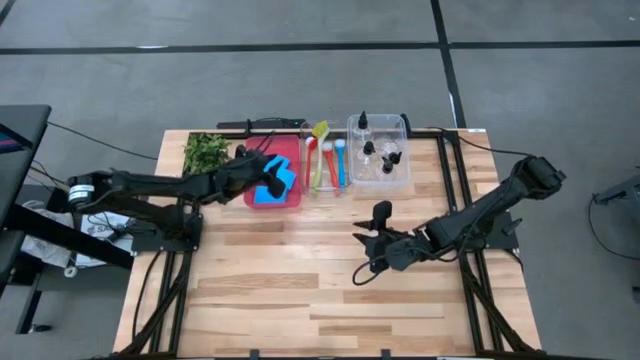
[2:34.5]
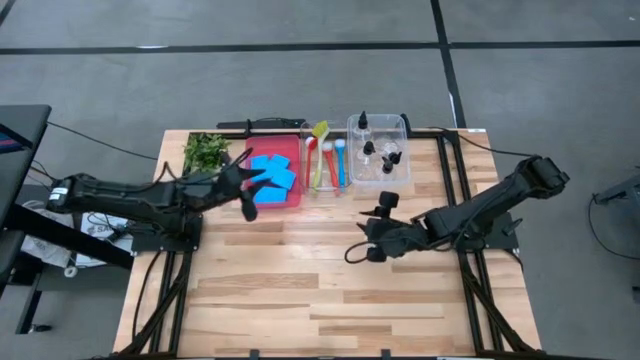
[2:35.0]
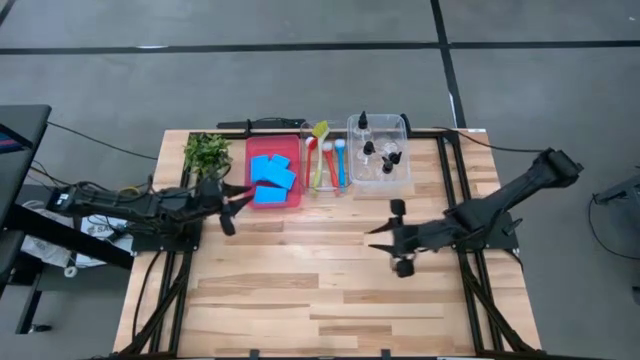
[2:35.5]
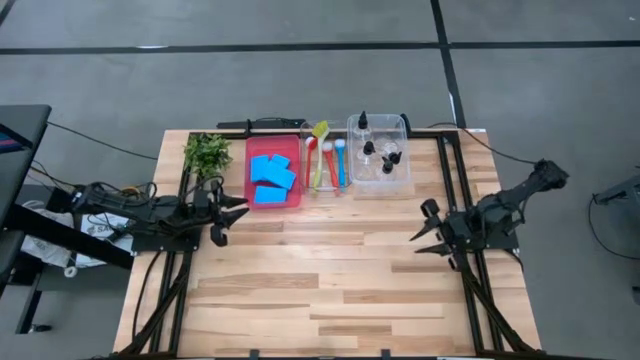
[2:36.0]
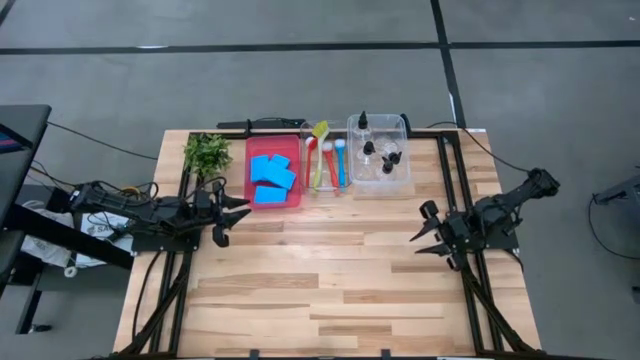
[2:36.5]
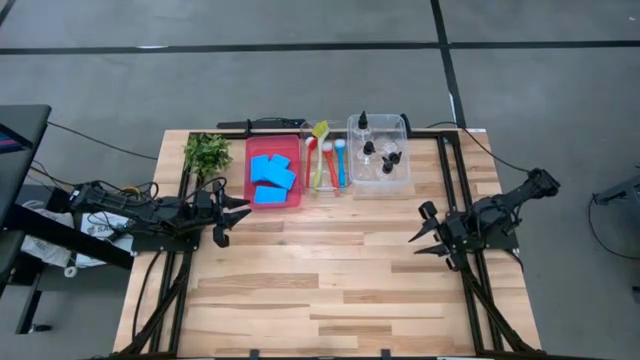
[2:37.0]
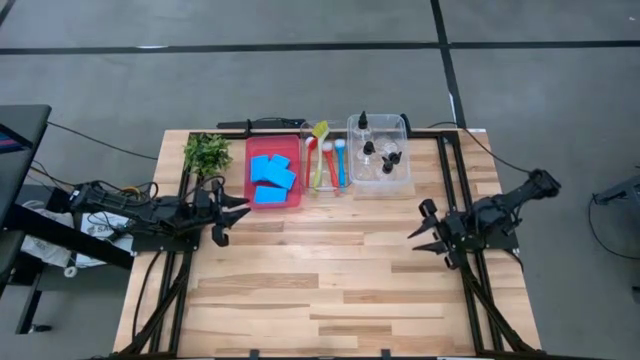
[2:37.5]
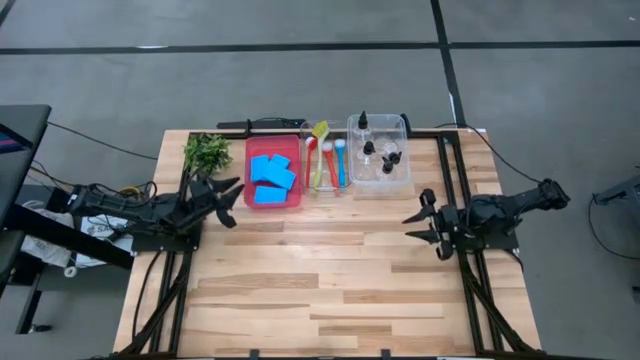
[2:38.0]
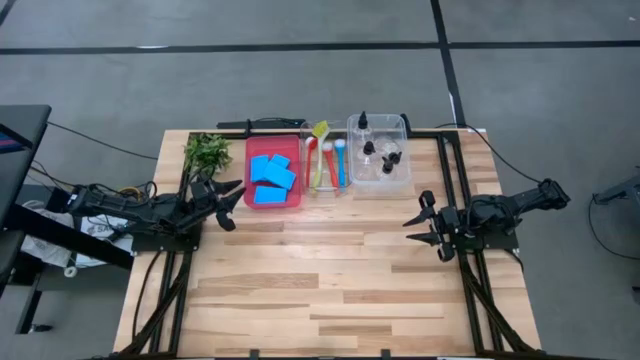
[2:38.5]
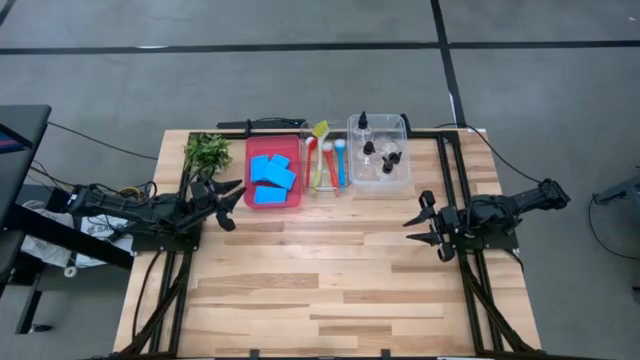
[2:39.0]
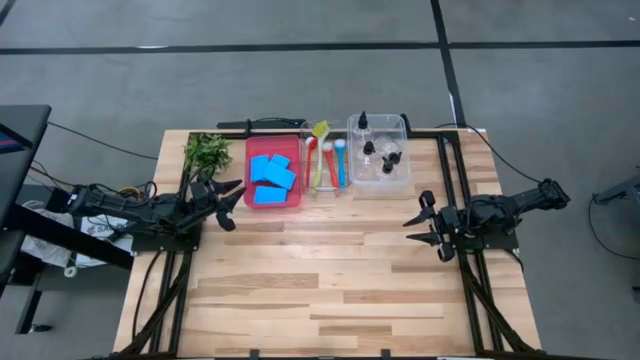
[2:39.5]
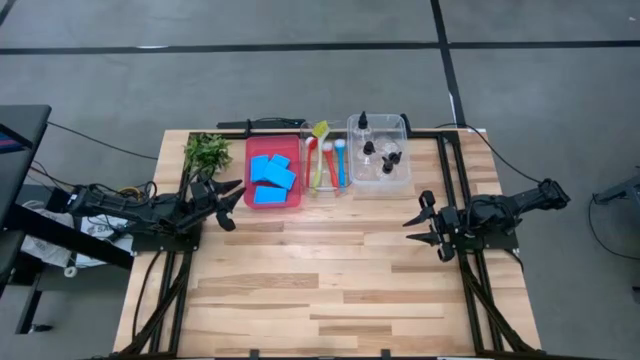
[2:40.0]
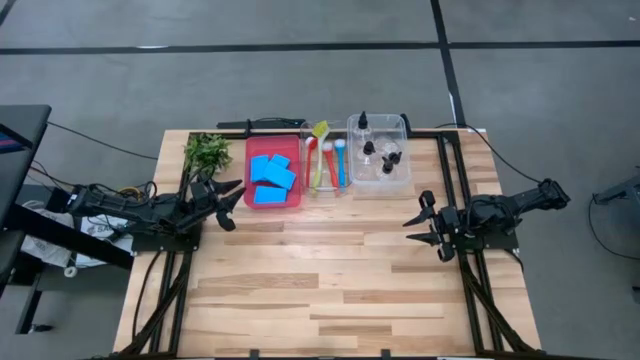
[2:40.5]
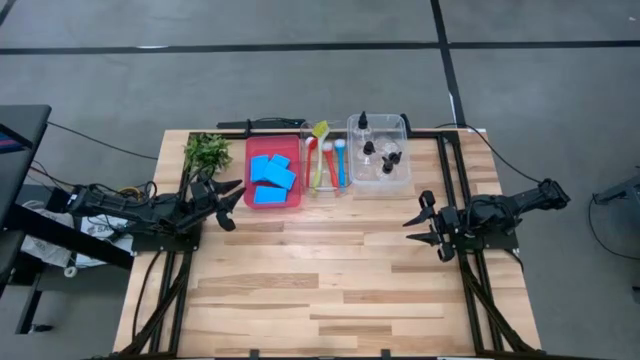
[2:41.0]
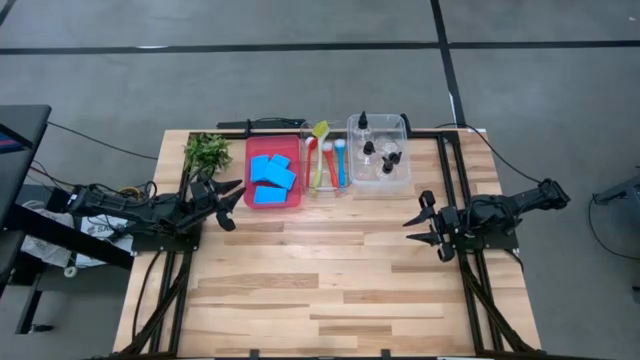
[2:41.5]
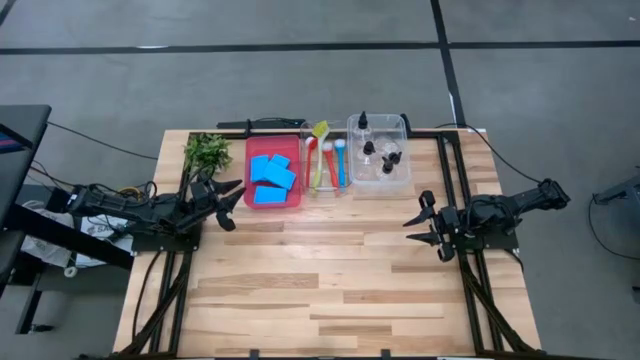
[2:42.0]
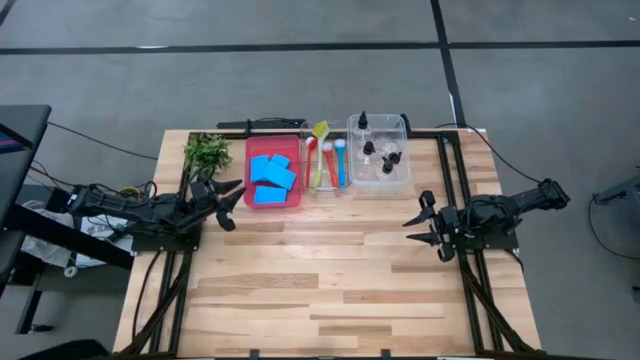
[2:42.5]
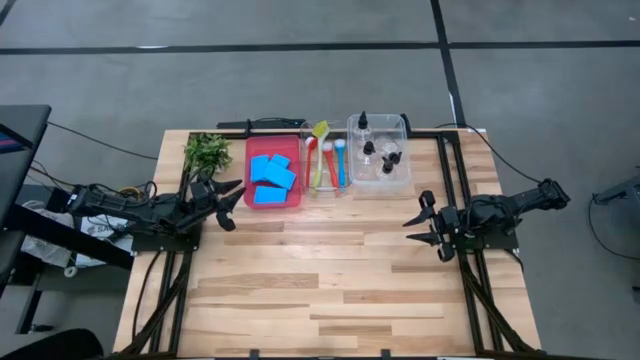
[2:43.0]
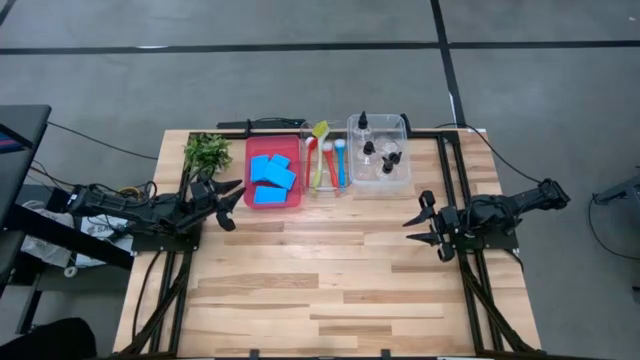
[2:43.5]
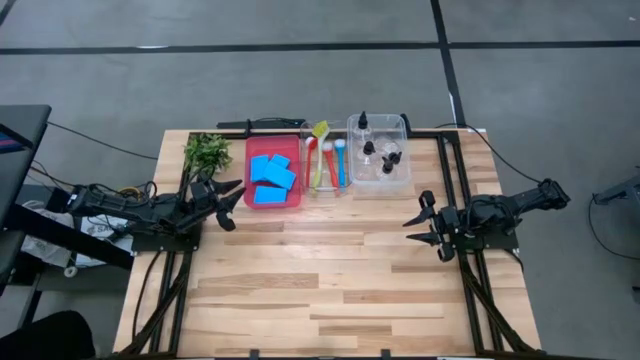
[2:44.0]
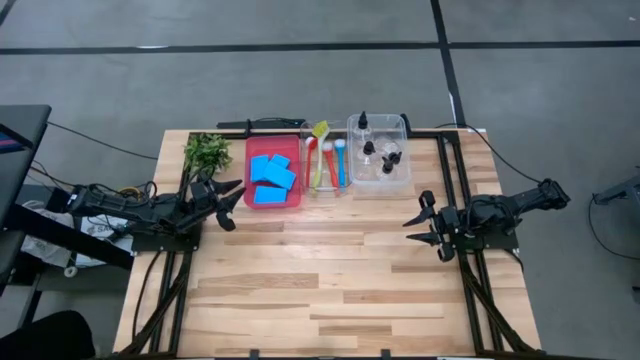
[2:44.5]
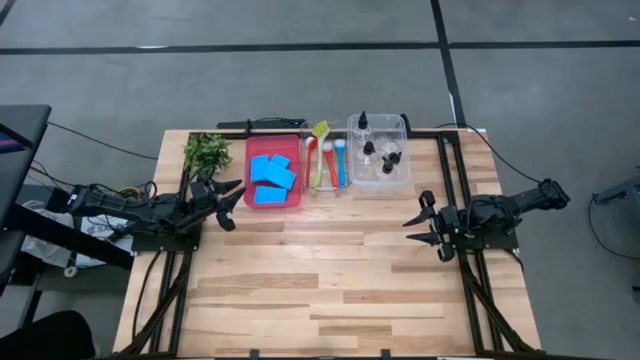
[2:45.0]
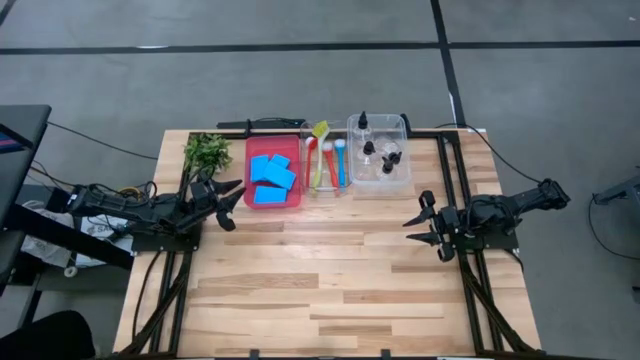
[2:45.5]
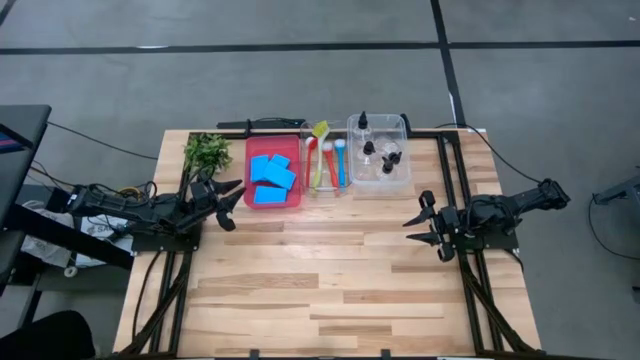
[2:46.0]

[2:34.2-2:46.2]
Task: Pick & Place Kitchen Sink Supplies
Return to Home Position

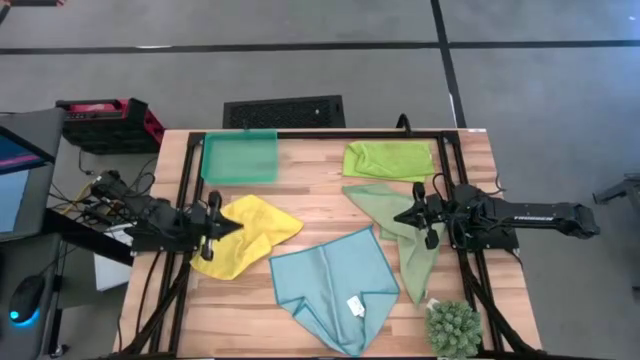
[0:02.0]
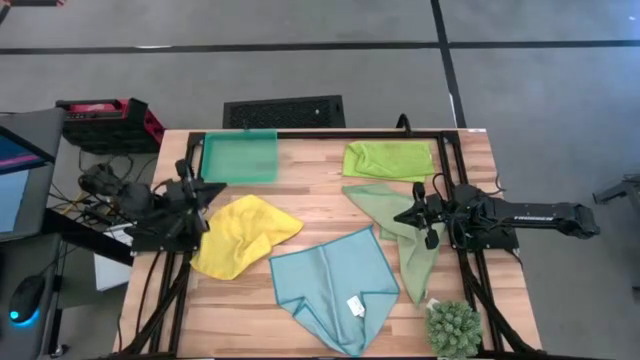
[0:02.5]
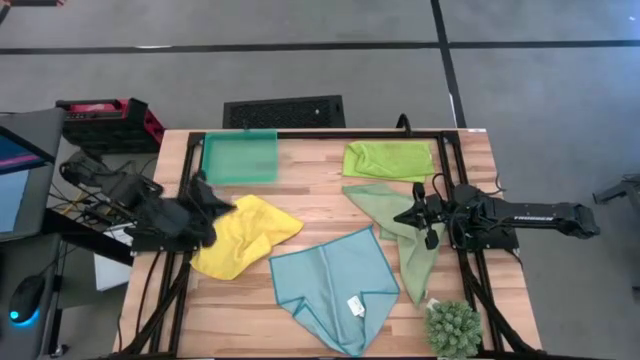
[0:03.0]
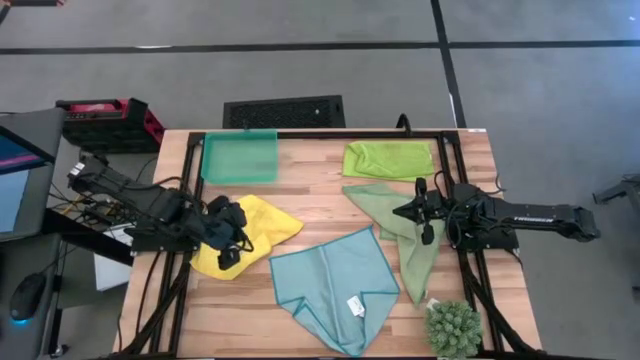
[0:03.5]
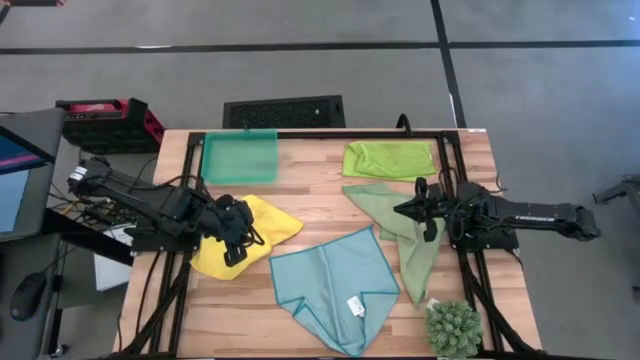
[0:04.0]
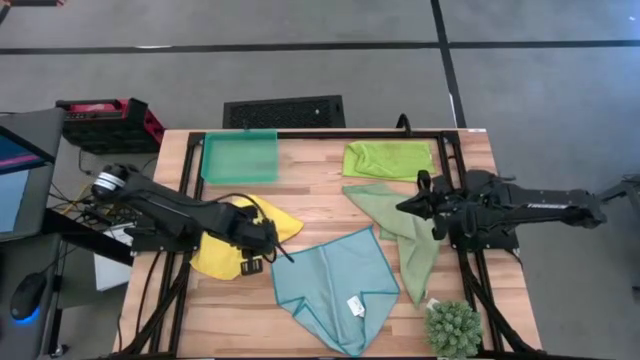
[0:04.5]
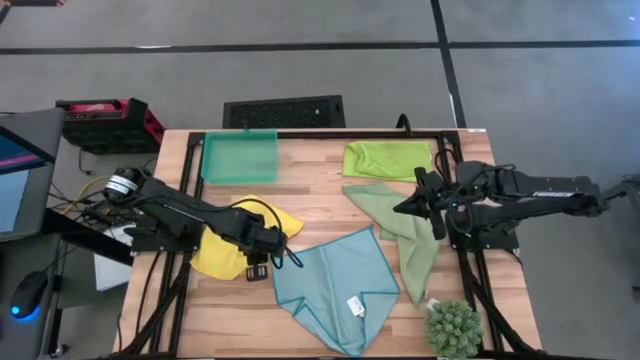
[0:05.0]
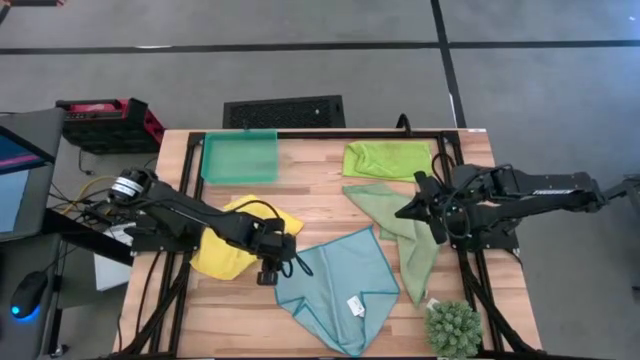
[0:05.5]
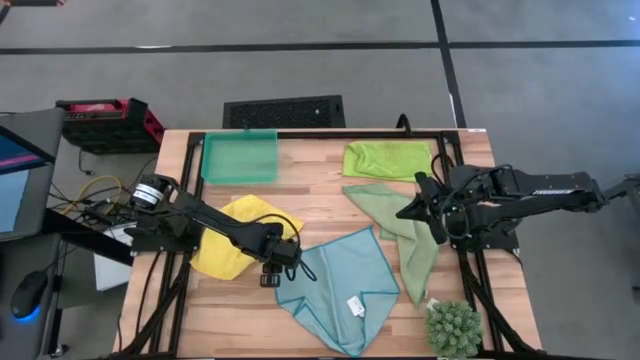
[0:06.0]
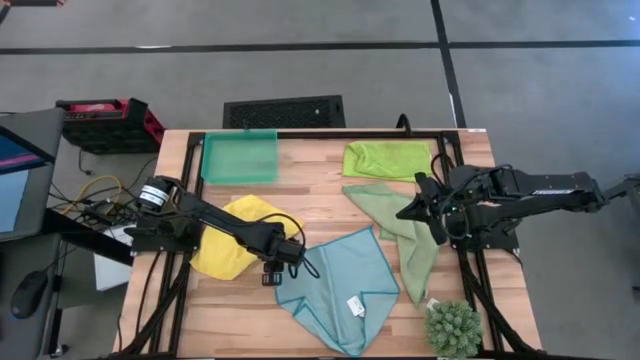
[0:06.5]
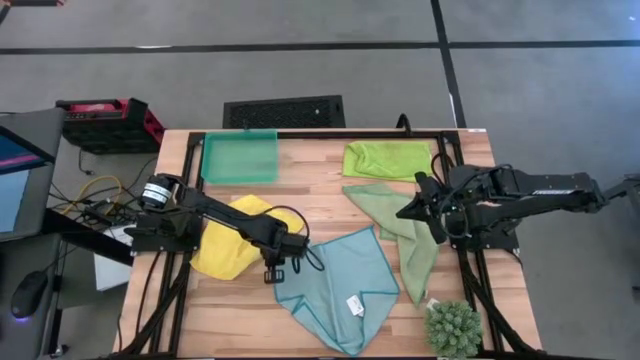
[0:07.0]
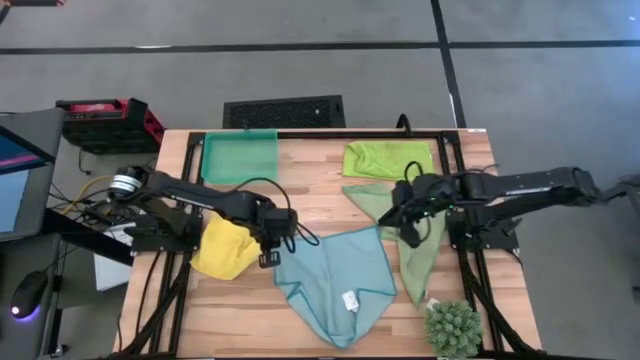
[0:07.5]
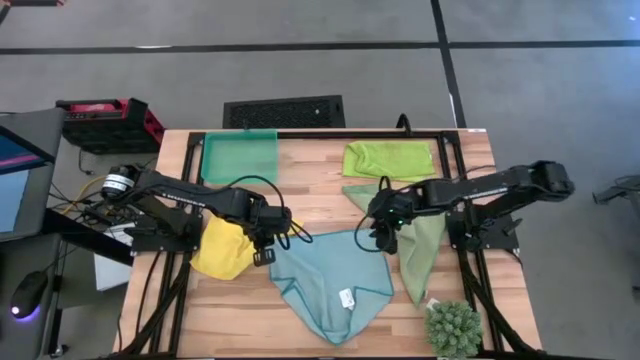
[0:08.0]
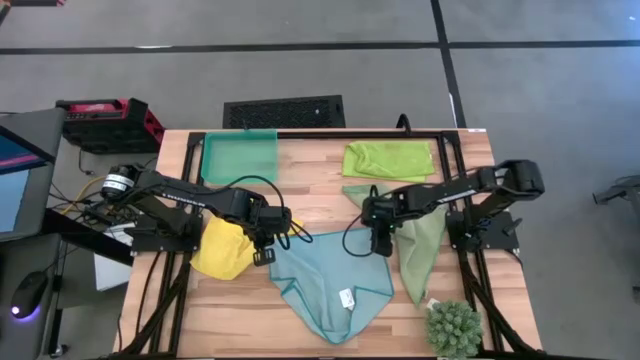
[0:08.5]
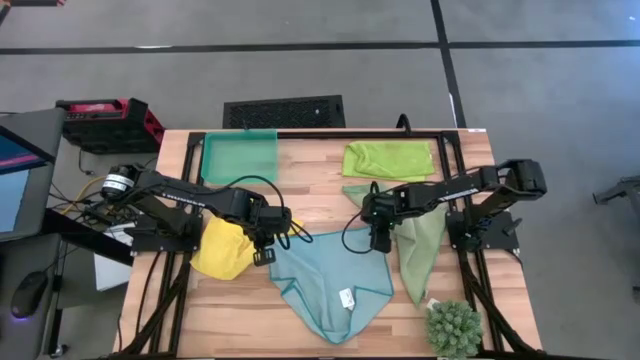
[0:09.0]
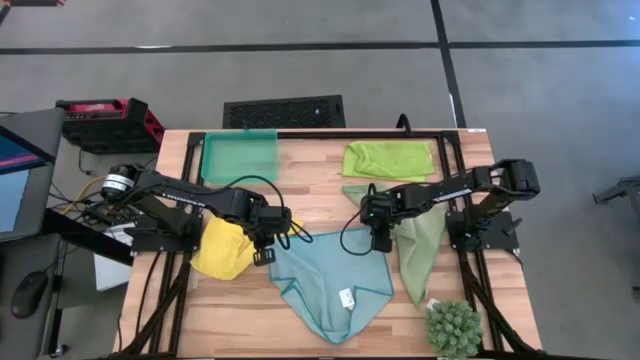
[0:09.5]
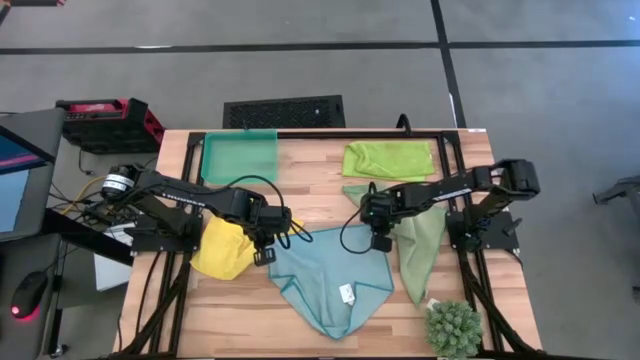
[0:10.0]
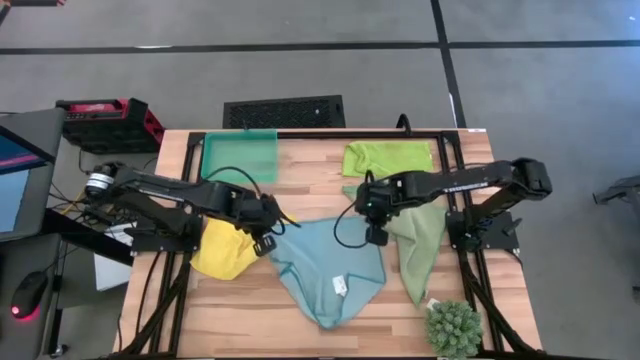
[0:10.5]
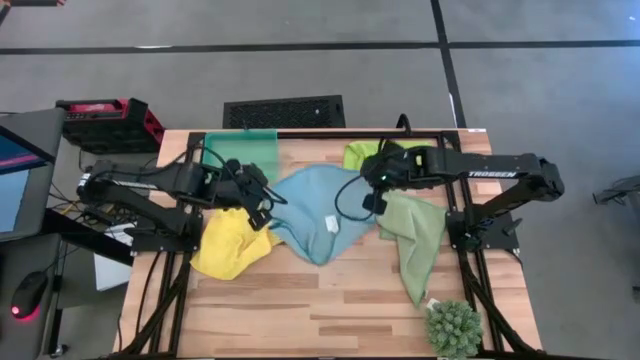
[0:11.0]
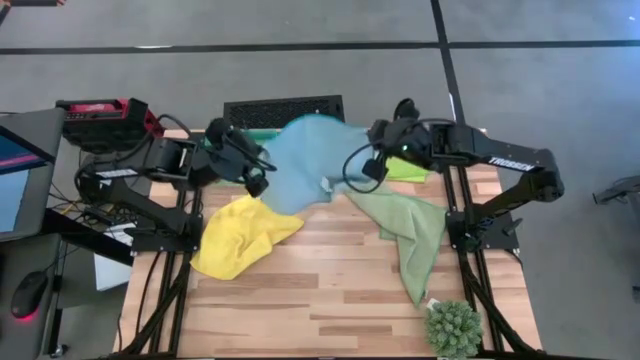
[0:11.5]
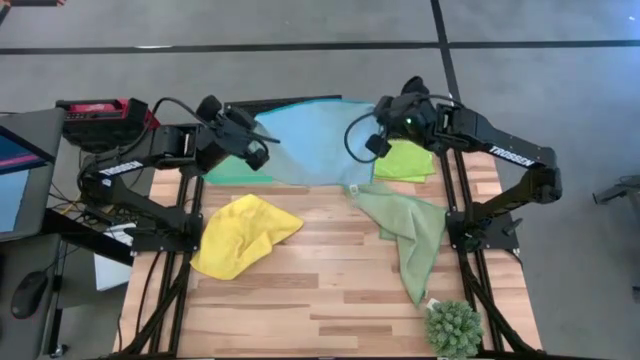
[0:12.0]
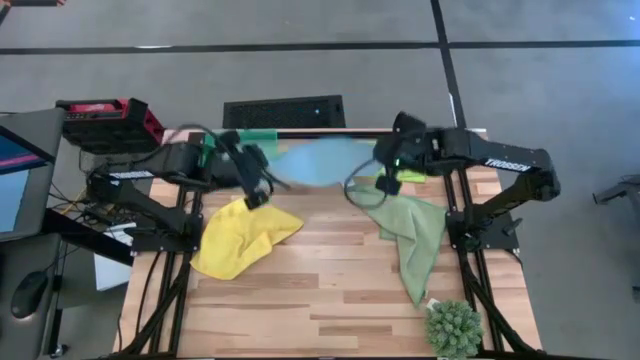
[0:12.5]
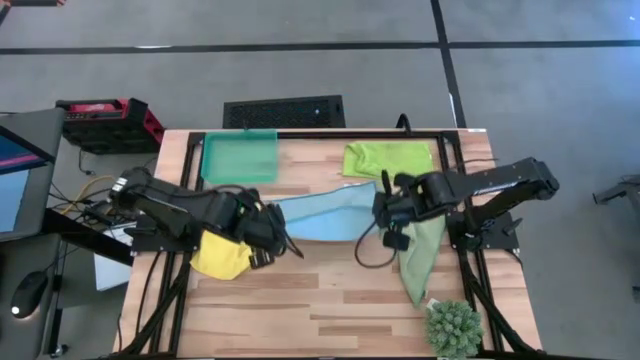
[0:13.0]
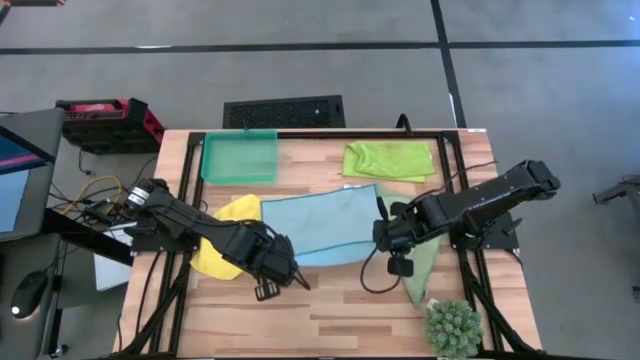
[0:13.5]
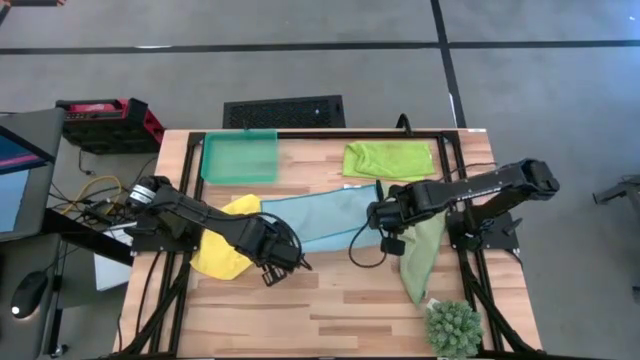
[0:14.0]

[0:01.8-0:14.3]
Task: Fold microfiber towels
Fold the blue microfiber towel
